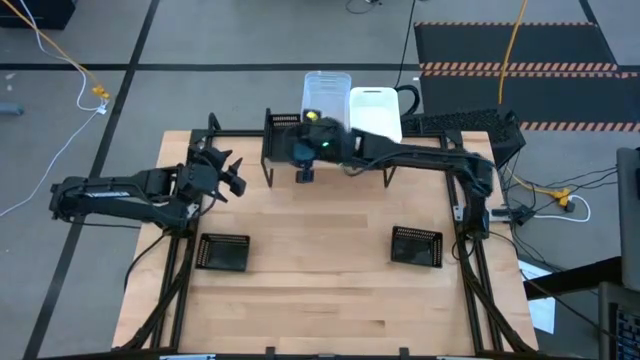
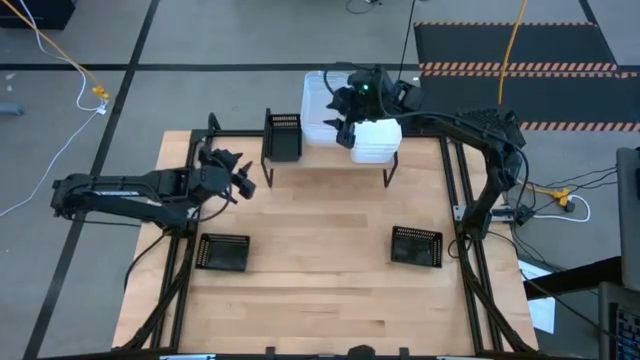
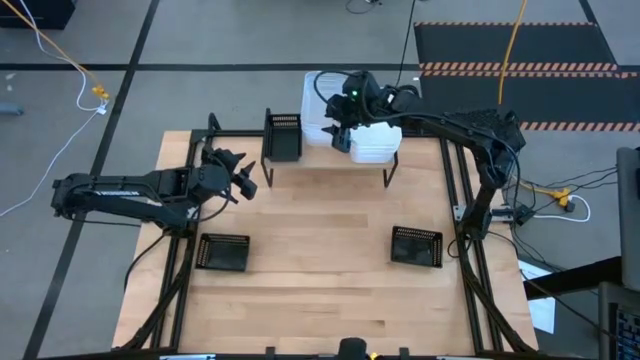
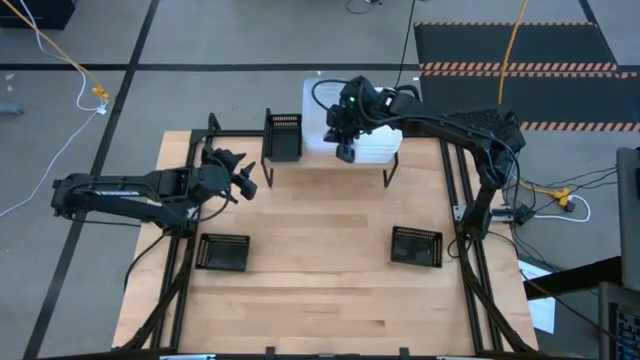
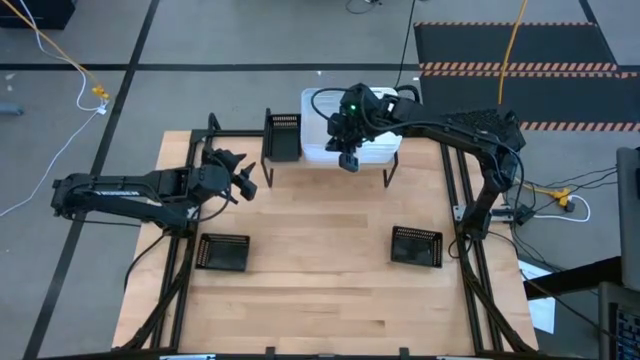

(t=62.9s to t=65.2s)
Task: Stack baskets on shelf by color
Adjust the transparent bins

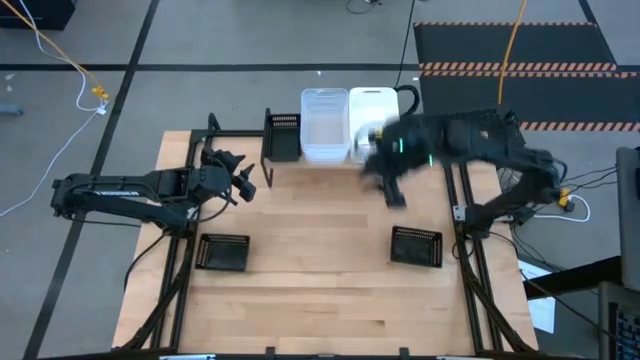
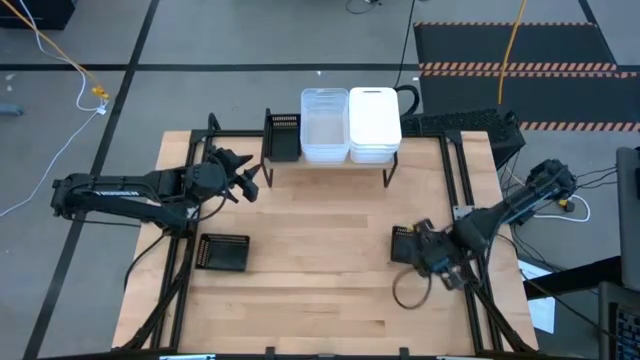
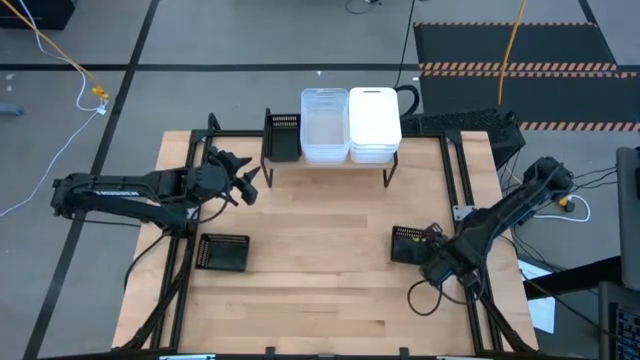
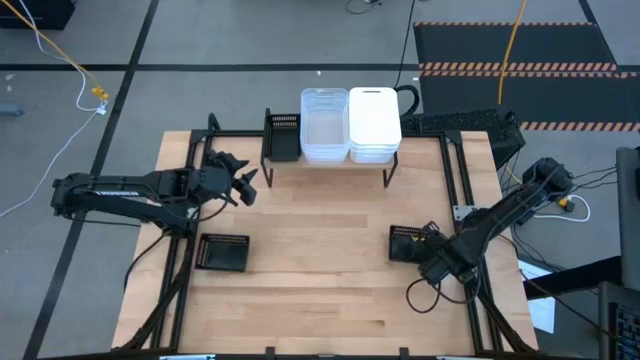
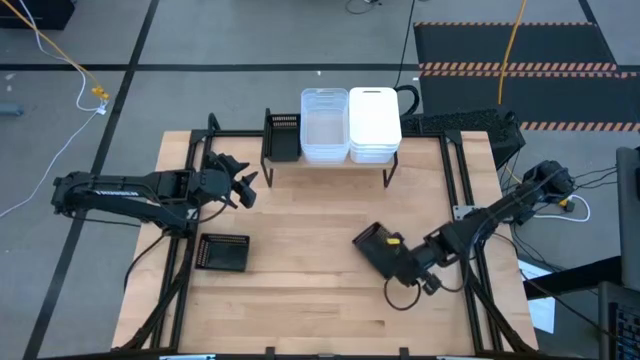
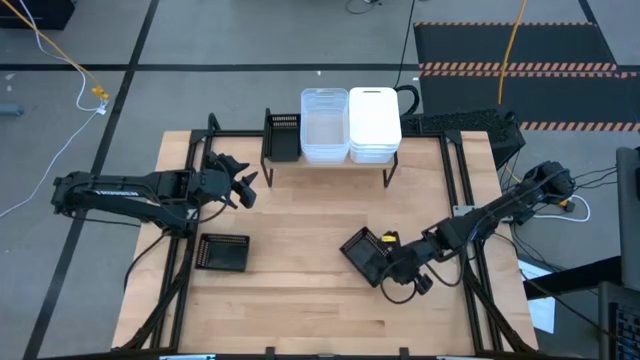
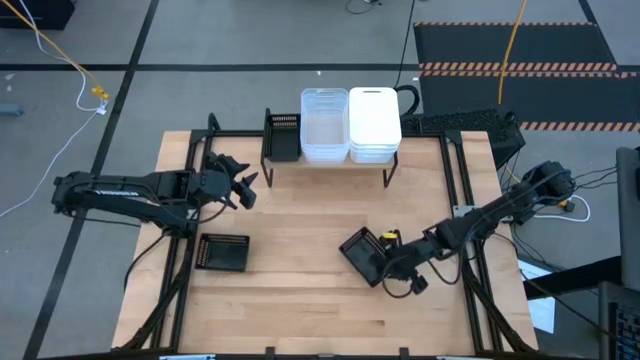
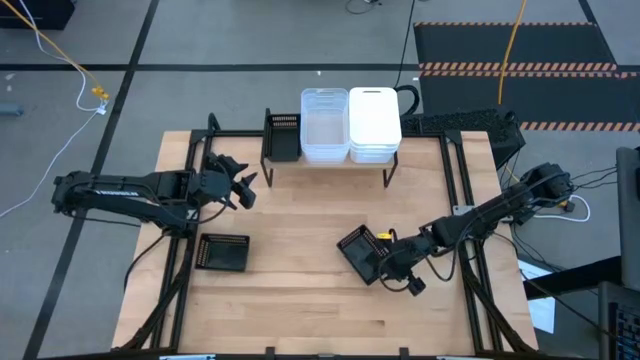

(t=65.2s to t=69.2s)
Stack the right black bin on top of the black bin on the shelf

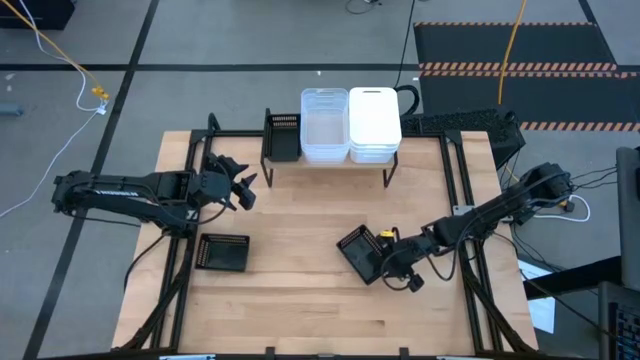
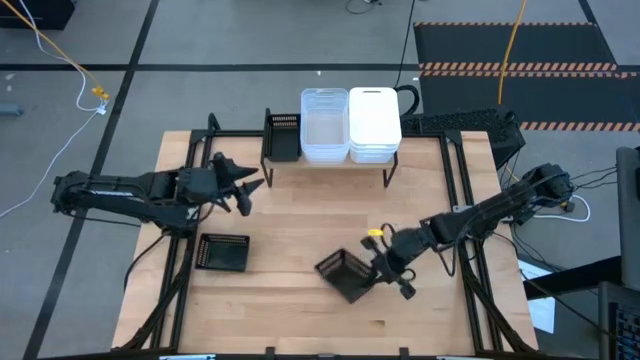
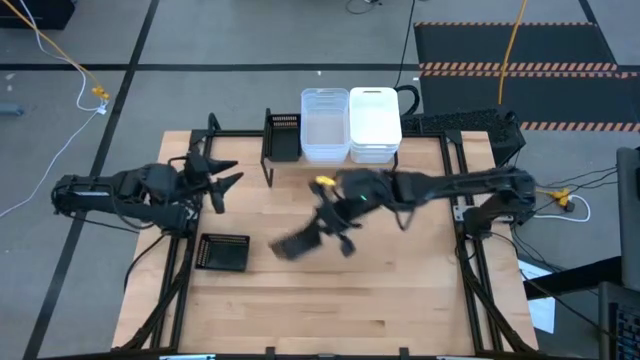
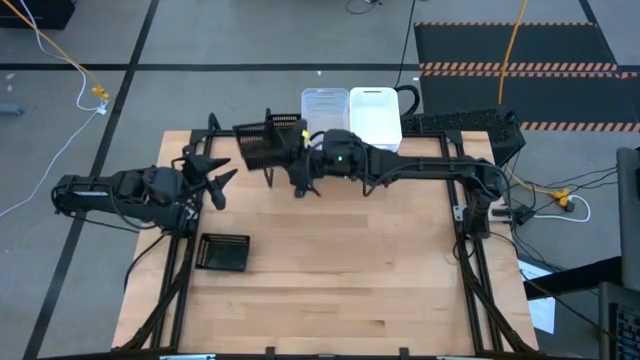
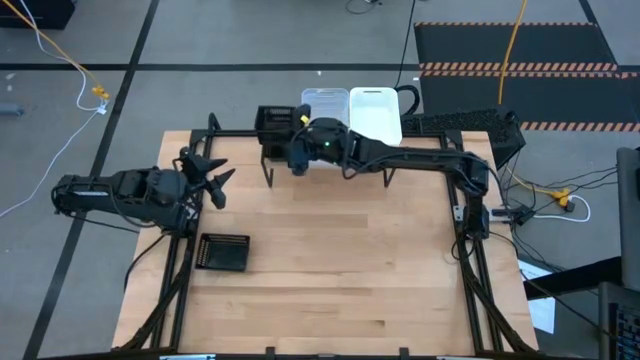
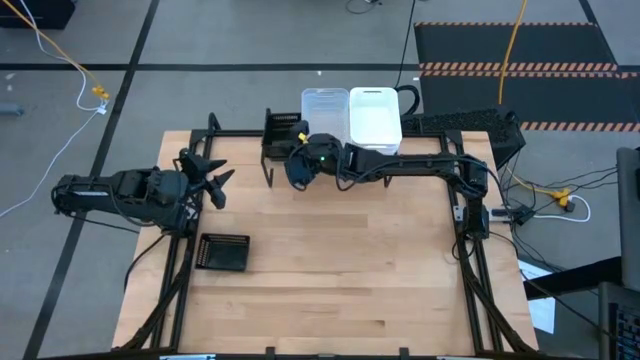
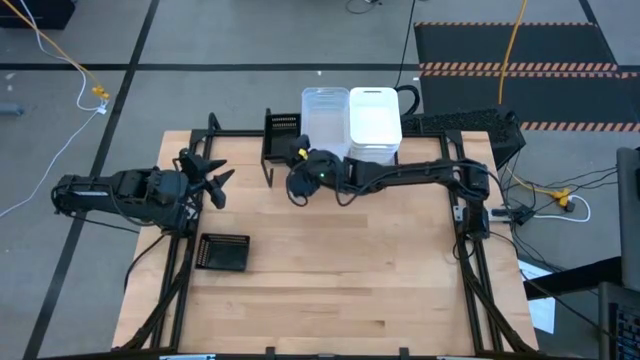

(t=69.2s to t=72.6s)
Stack the right black bin on top of the black bin on the shelf

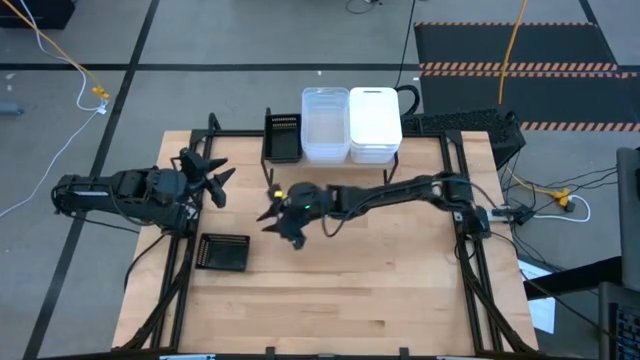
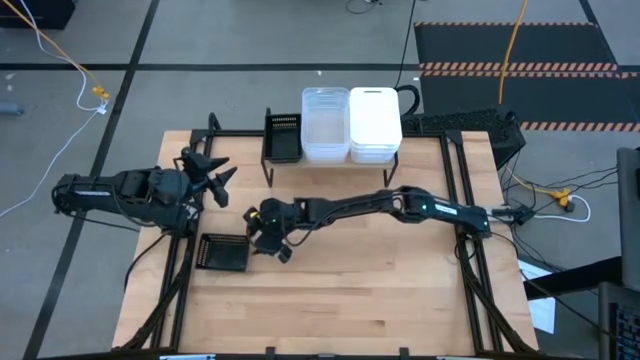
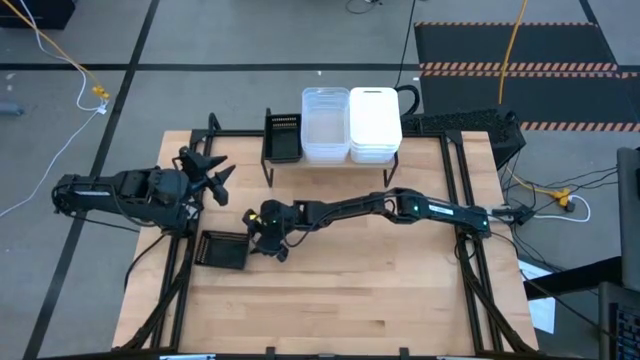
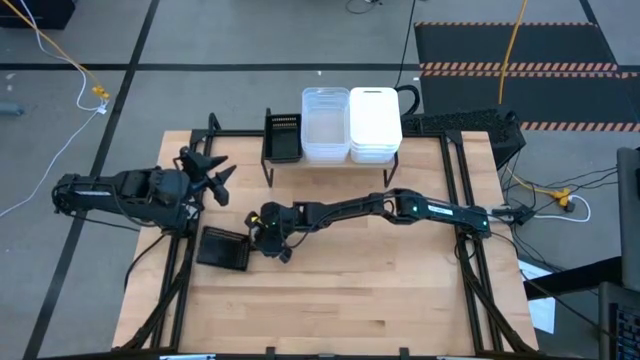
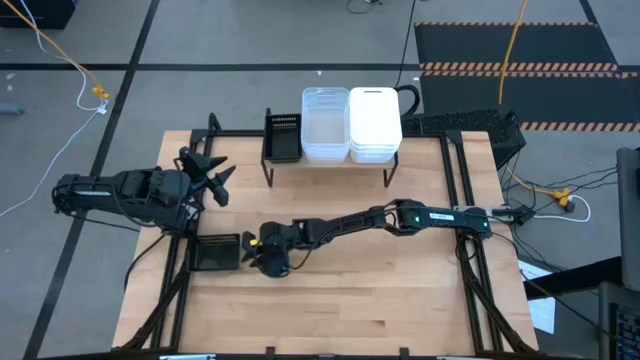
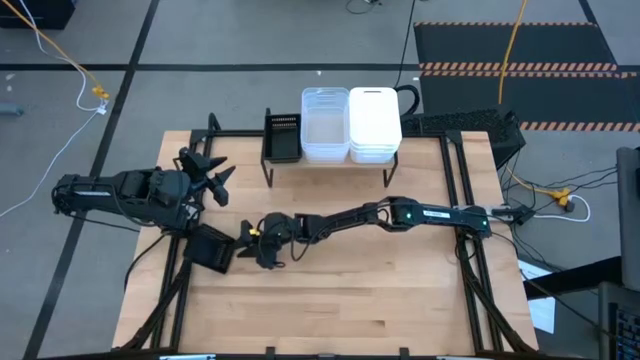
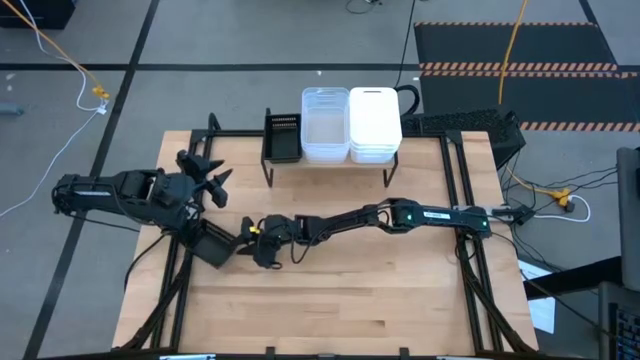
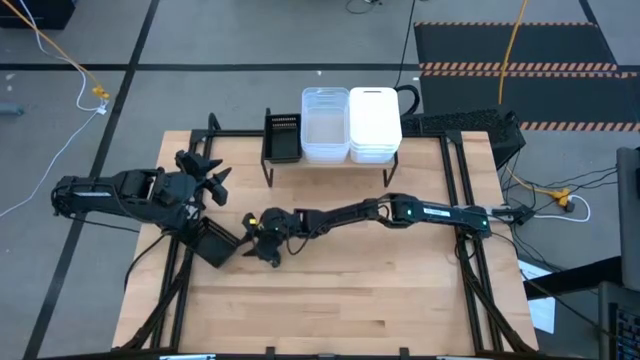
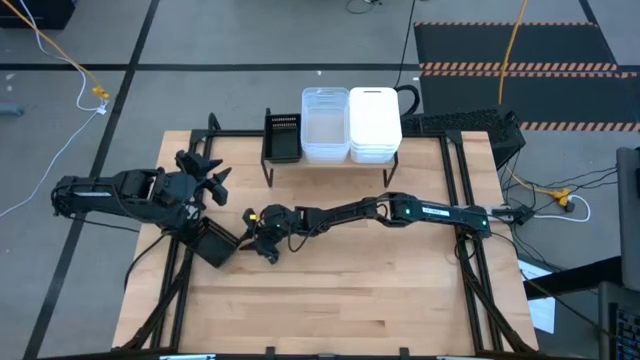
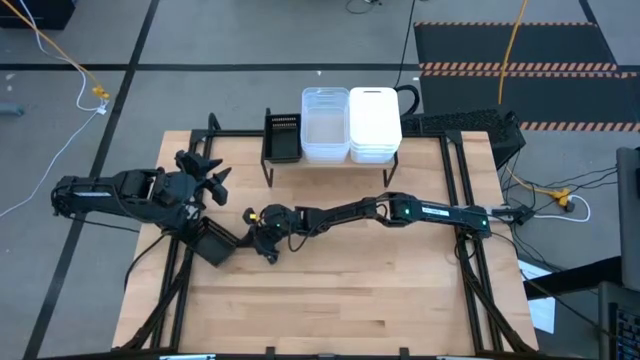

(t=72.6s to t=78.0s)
Stack the black bin on top of the black bins on the shelf

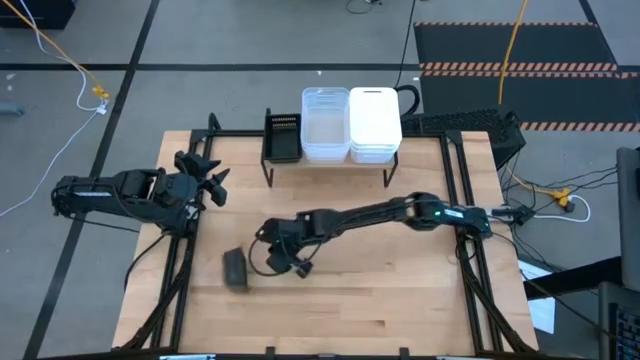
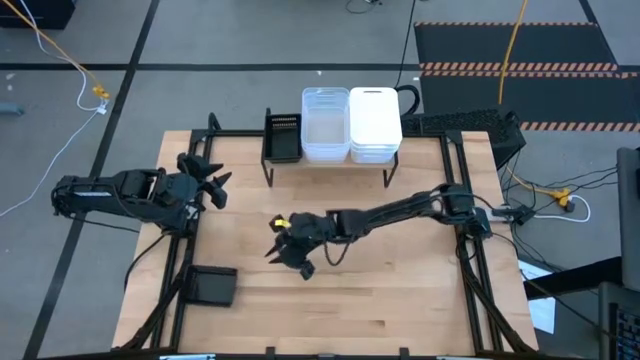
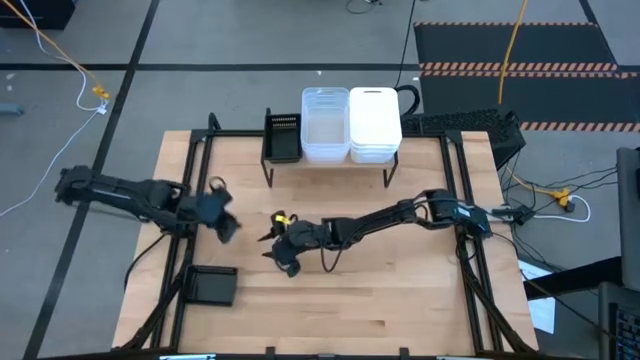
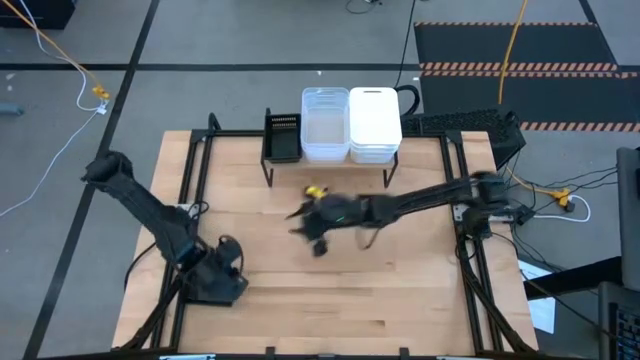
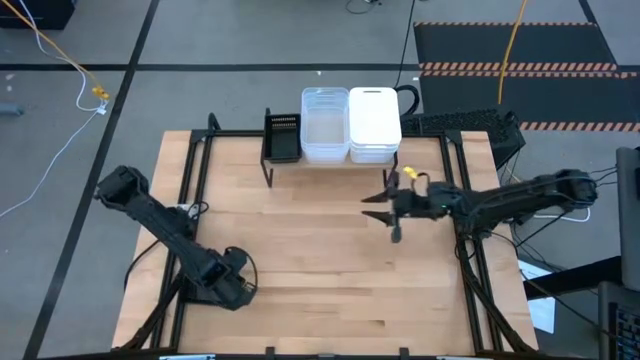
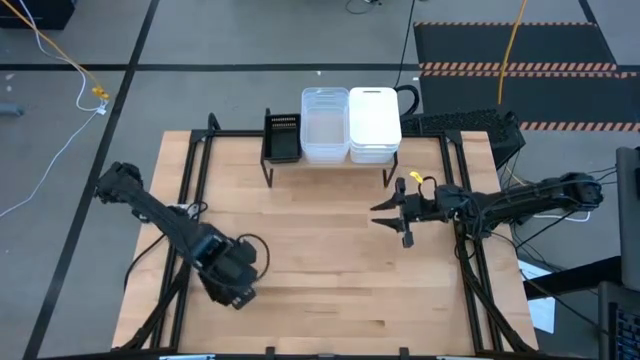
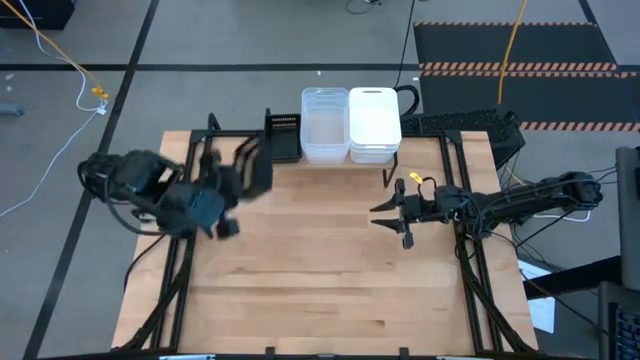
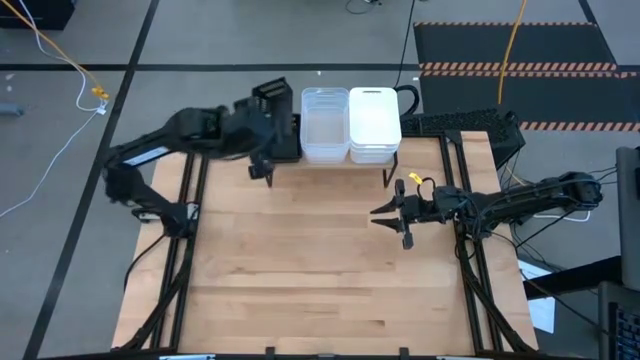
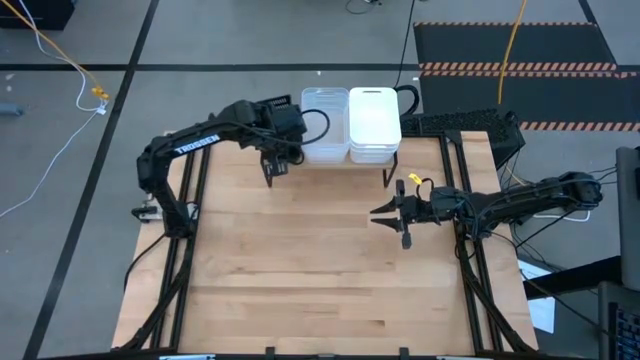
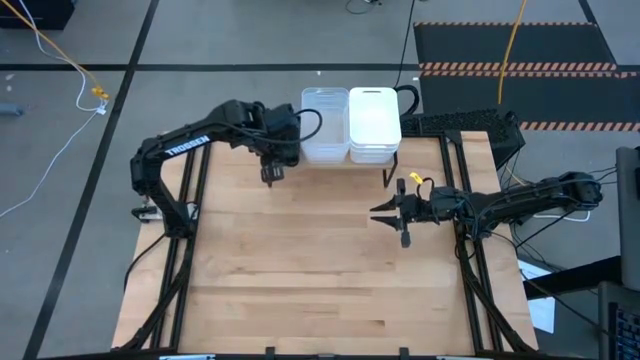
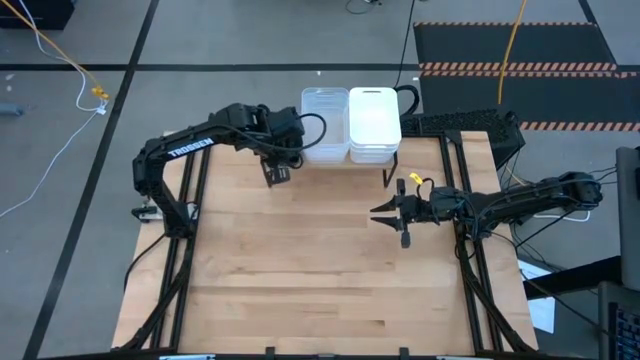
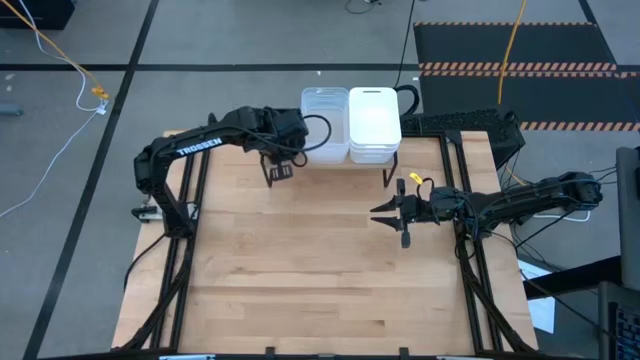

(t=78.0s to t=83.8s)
Stack the black bin on top of the black bins on the shelf

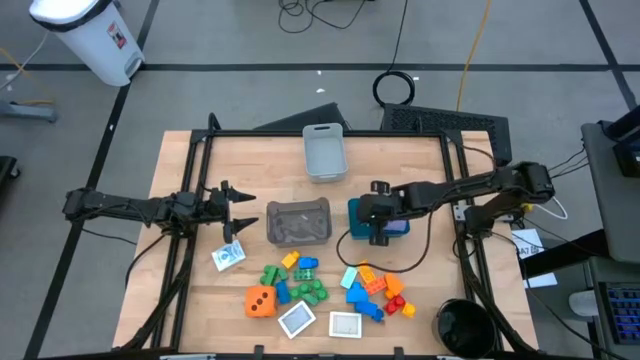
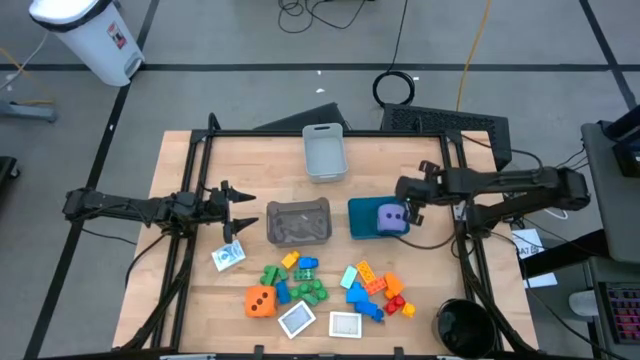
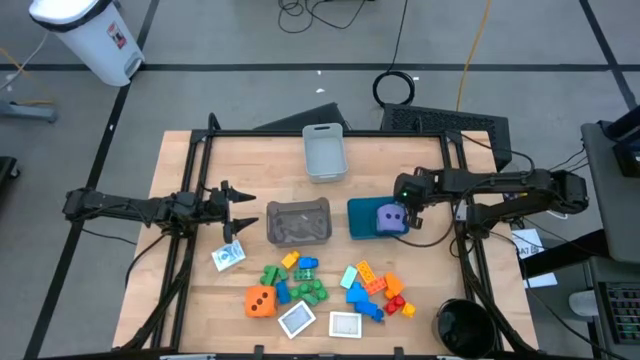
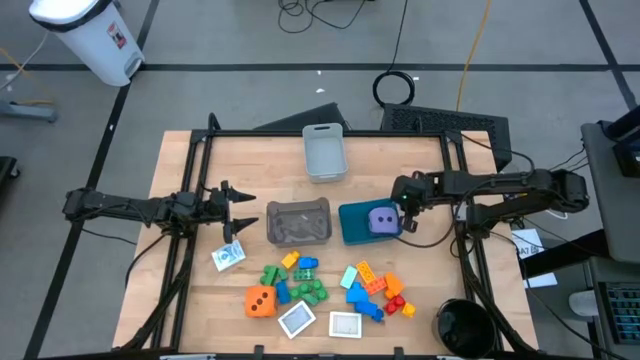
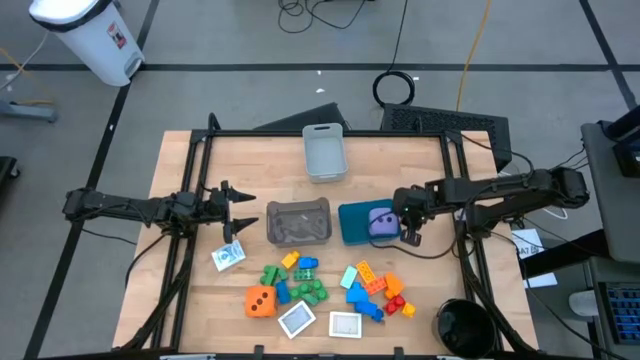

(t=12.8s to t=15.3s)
Task: Pick & Place Toys
Adjust the blue bin slightly
